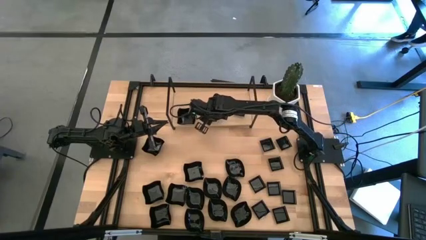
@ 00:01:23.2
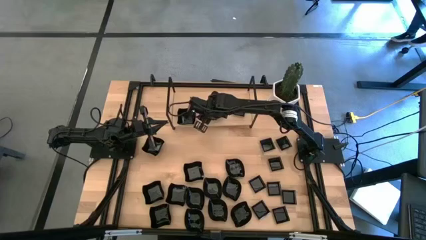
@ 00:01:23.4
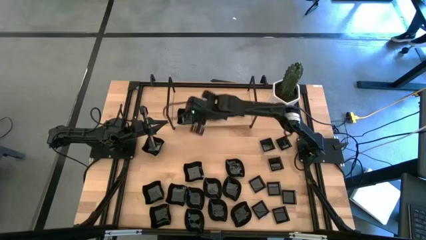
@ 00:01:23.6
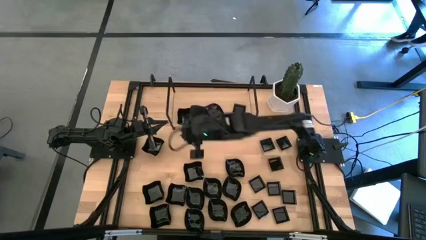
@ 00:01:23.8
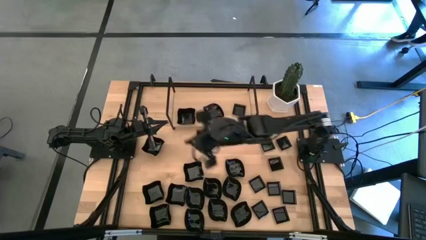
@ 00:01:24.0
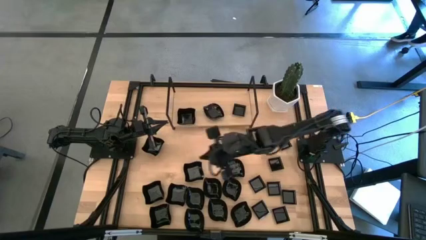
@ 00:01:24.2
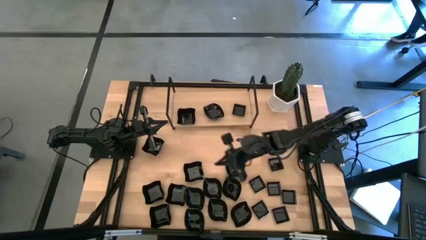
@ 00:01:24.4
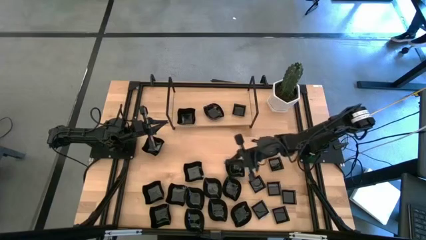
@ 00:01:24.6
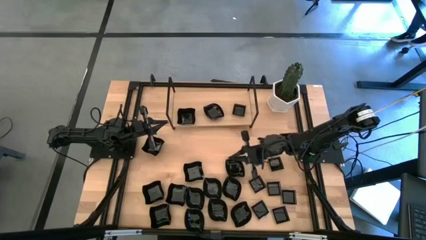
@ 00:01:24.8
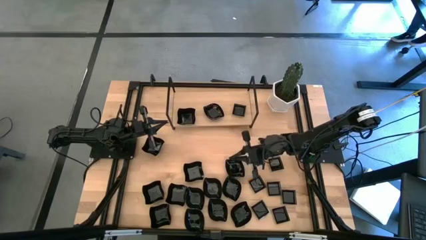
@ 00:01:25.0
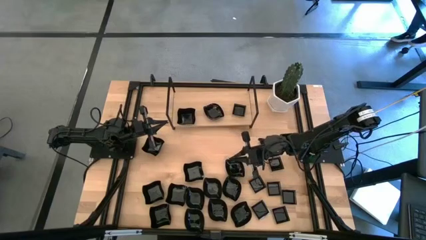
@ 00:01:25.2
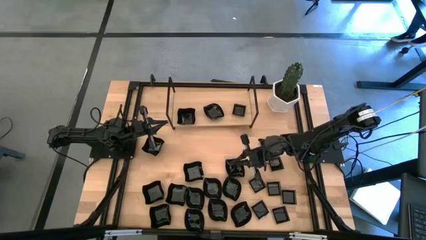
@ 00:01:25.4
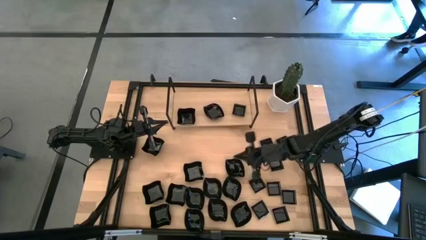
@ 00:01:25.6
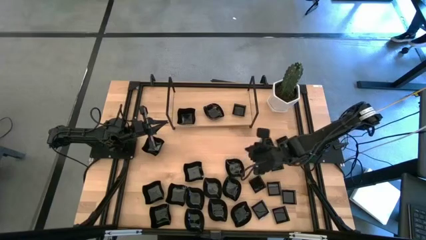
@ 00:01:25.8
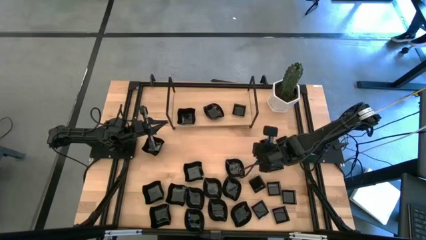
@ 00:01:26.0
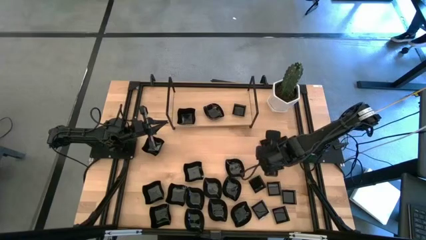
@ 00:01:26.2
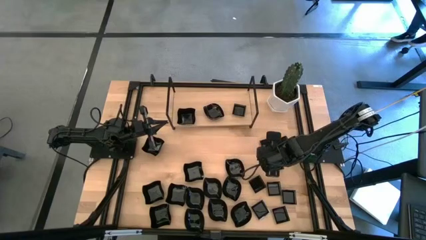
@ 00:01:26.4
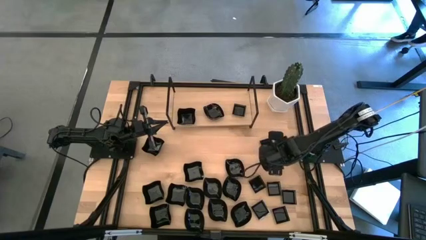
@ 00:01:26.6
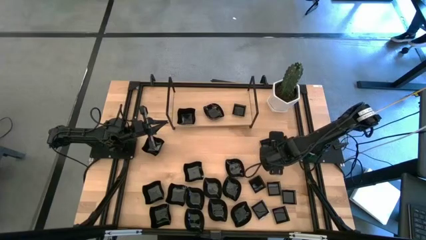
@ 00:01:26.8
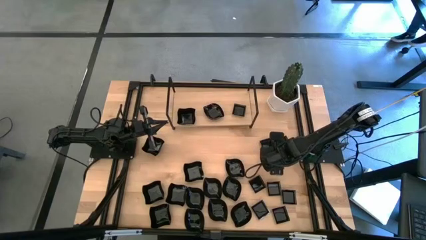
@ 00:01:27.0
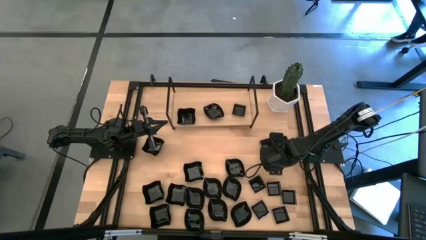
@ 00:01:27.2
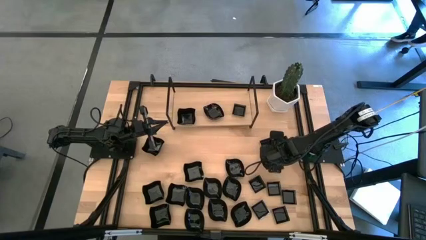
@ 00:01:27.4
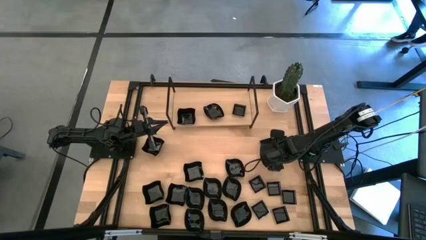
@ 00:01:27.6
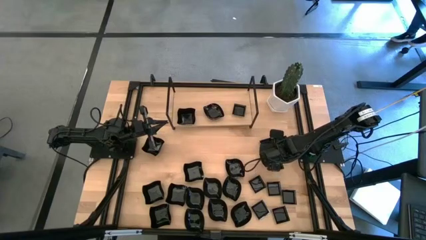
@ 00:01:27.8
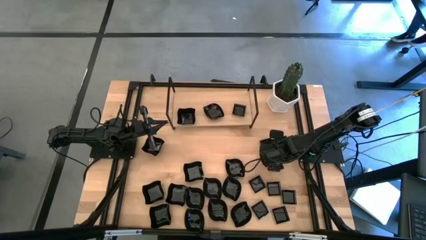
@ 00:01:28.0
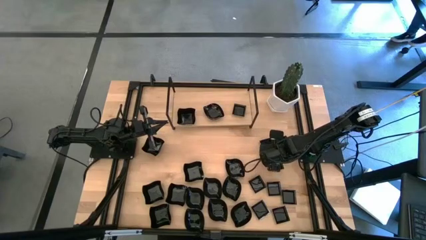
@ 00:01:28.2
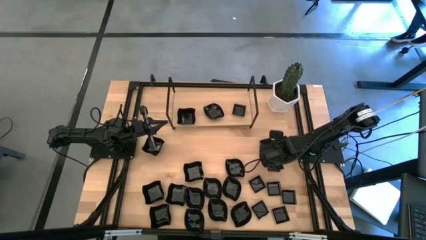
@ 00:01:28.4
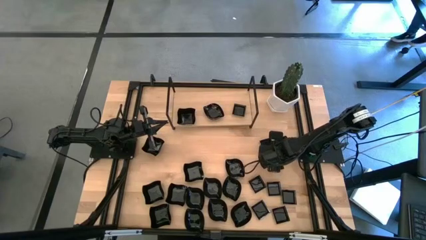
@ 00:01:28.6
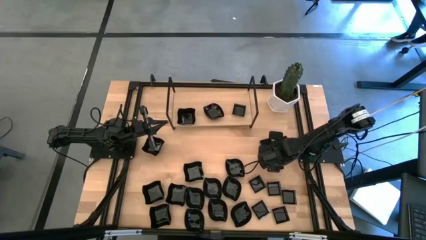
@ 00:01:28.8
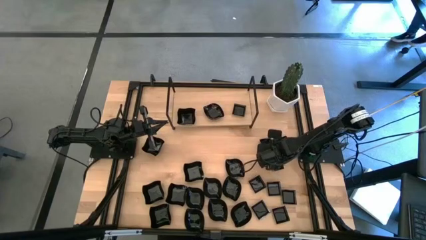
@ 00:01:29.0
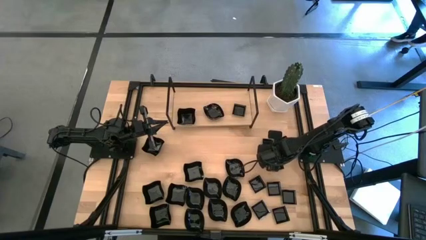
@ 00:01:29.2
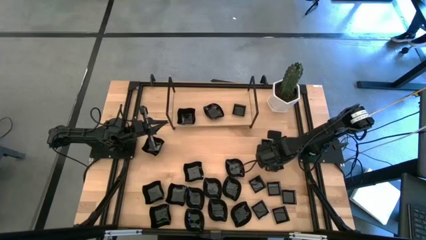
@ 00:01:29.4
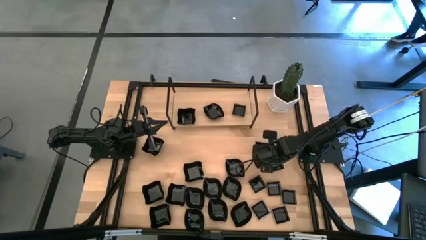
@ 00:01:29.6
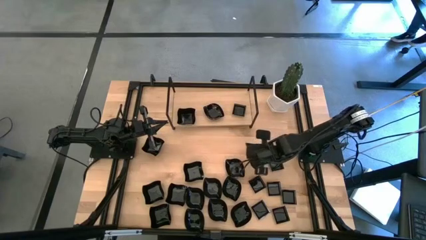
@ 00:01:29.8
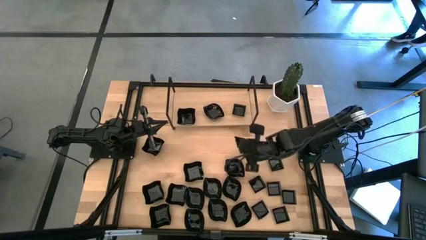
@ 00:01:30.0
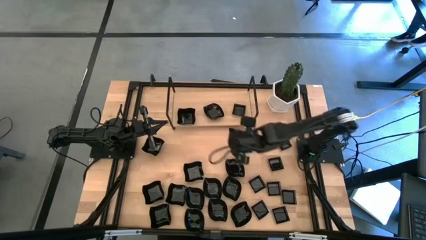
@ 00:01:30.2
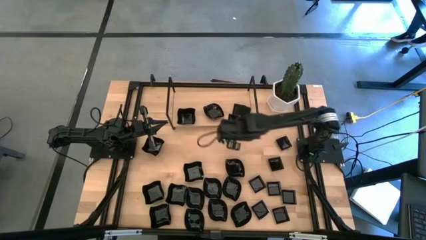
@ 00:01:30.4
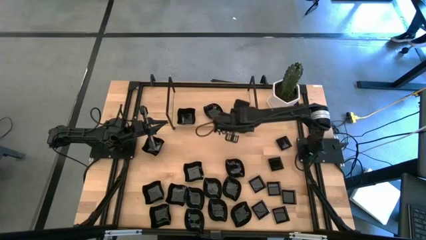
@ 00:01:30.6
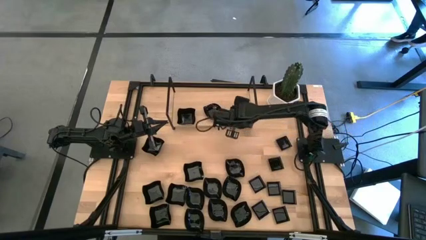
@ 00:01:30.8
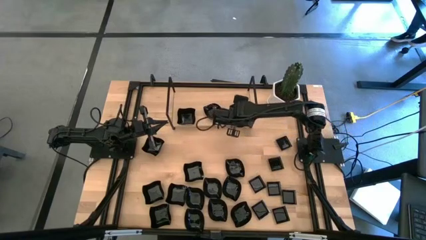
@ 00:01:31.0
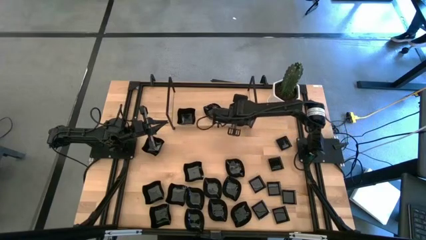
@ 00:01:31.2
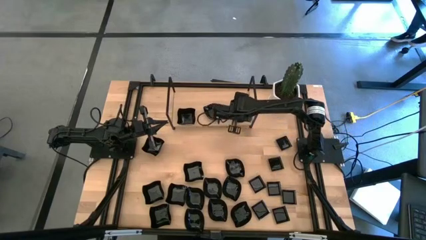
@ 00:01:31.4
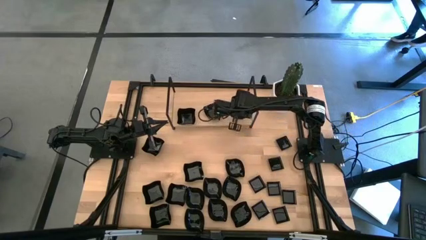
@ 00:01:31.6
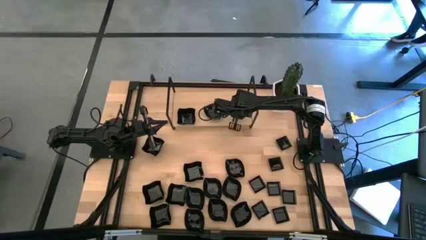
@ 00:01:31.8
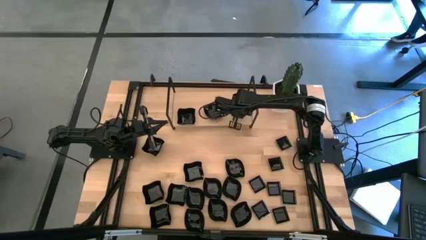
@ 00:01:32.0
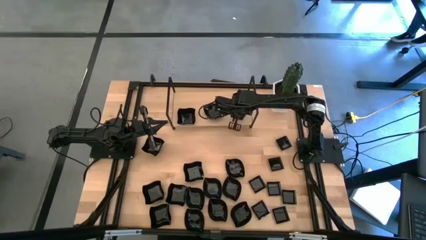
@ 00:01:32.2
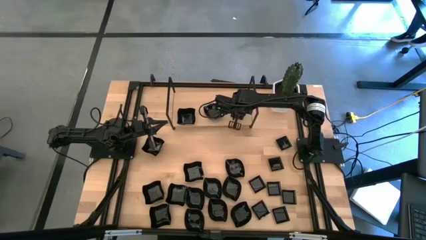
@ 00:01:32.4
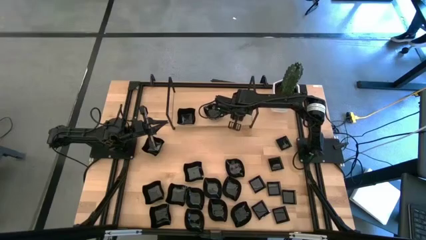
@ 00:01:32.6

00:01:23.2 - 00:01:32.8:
Task: Pick & Place Mini shaped plates
Stack the black square plate on top of the black square plate on the shelf

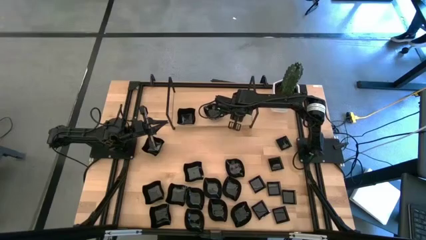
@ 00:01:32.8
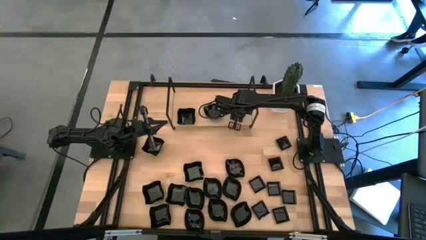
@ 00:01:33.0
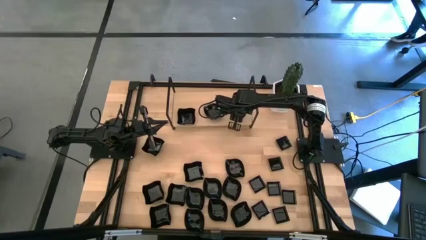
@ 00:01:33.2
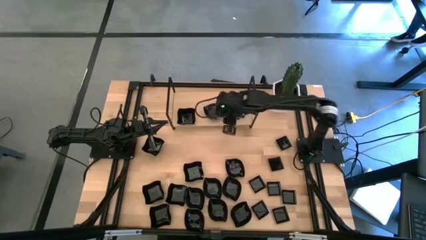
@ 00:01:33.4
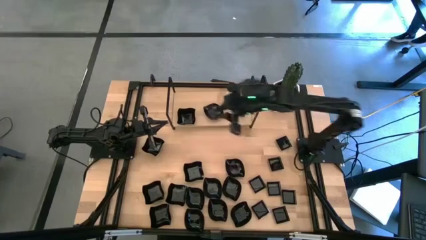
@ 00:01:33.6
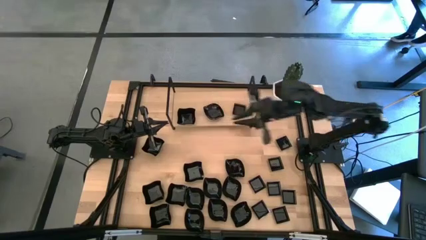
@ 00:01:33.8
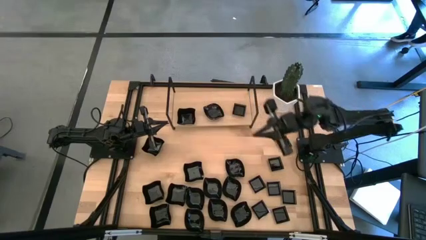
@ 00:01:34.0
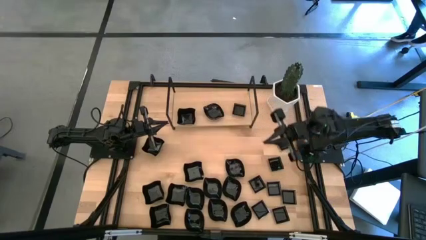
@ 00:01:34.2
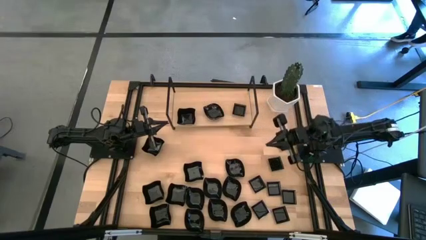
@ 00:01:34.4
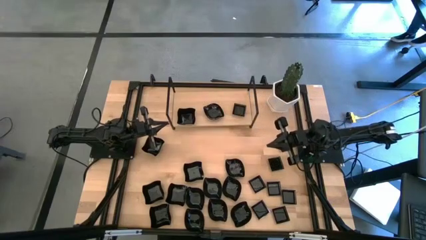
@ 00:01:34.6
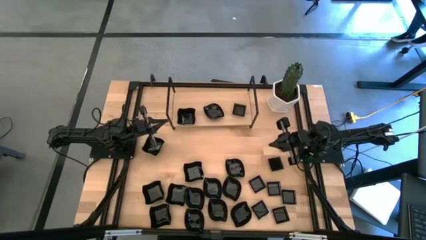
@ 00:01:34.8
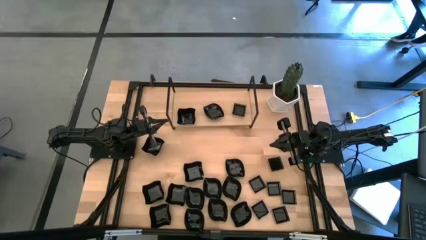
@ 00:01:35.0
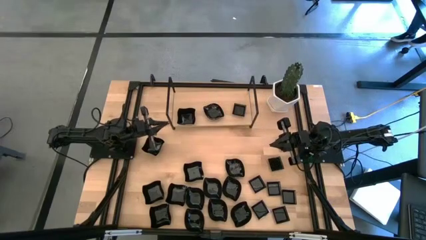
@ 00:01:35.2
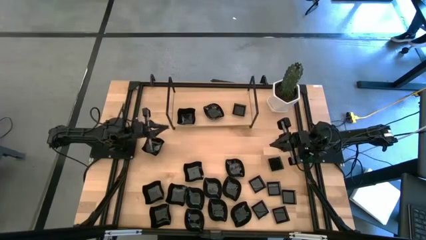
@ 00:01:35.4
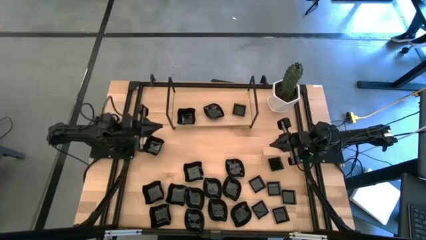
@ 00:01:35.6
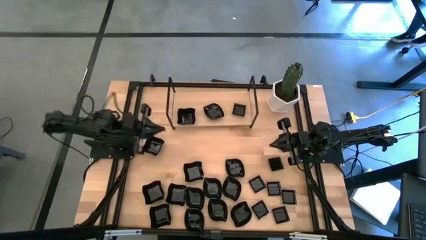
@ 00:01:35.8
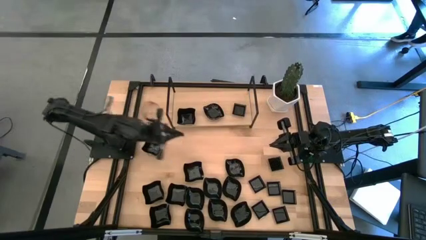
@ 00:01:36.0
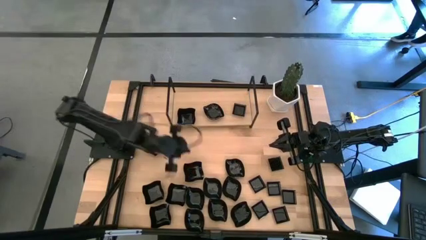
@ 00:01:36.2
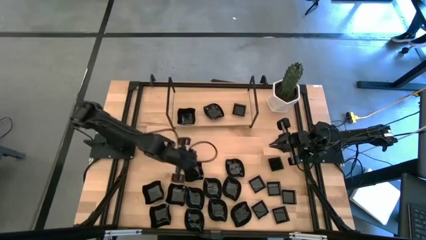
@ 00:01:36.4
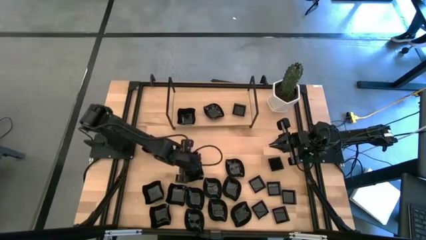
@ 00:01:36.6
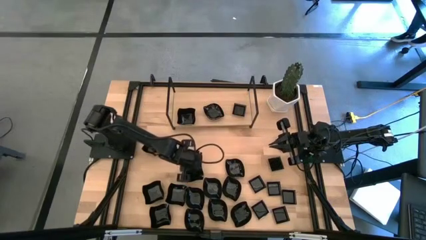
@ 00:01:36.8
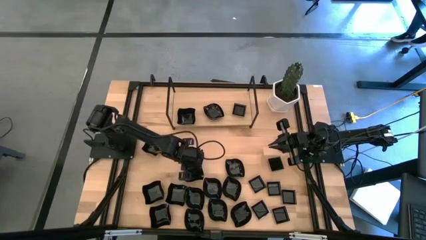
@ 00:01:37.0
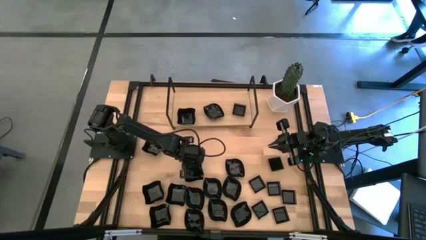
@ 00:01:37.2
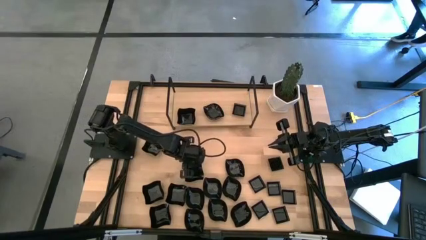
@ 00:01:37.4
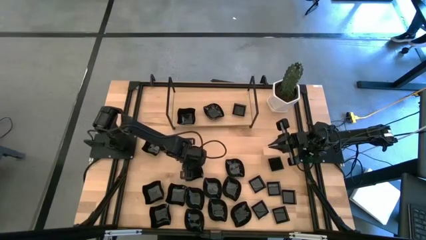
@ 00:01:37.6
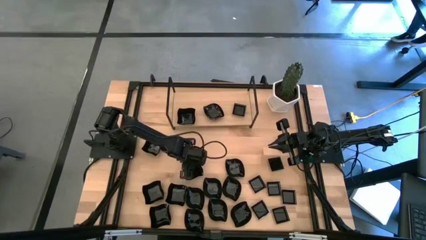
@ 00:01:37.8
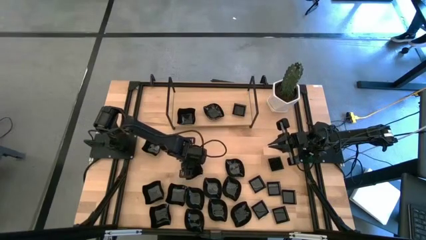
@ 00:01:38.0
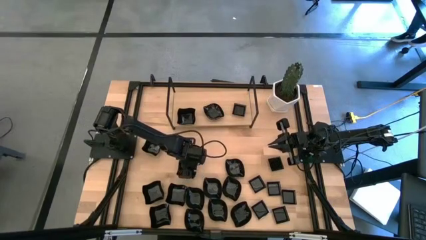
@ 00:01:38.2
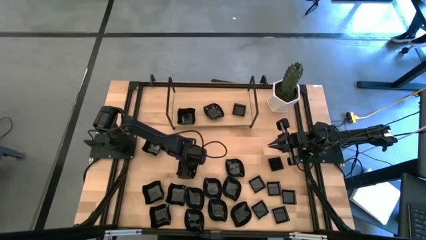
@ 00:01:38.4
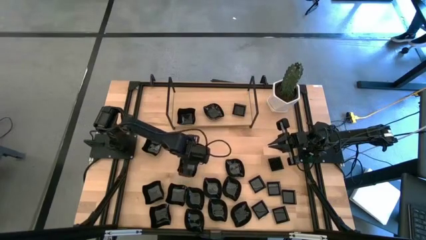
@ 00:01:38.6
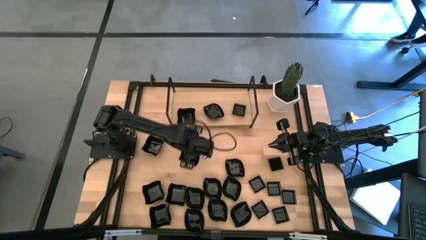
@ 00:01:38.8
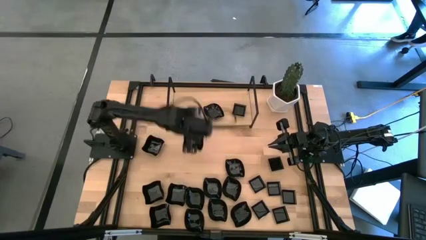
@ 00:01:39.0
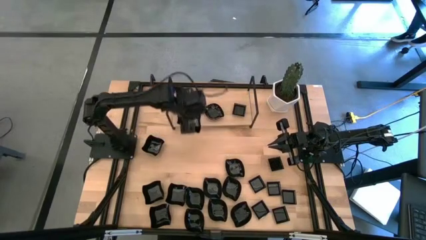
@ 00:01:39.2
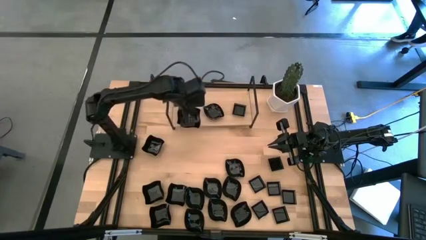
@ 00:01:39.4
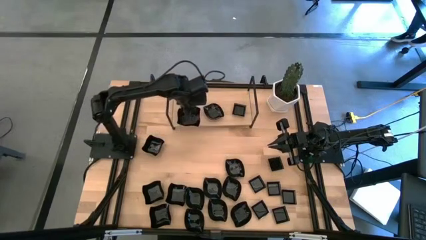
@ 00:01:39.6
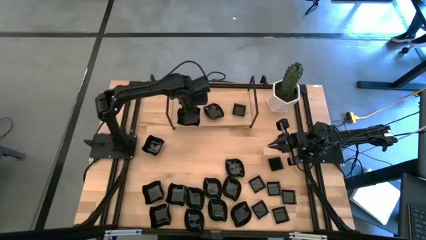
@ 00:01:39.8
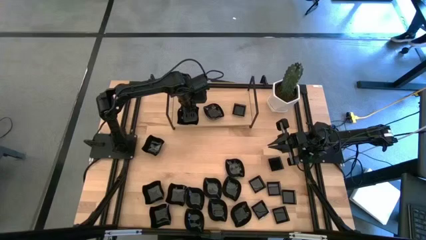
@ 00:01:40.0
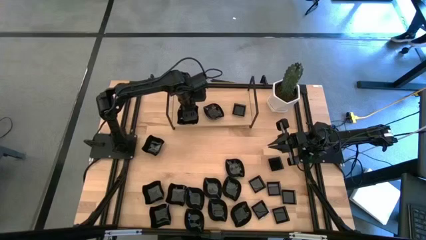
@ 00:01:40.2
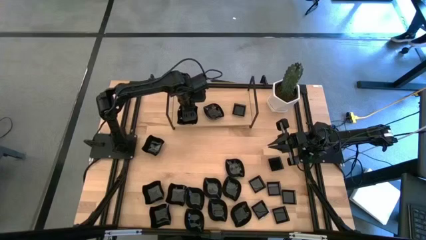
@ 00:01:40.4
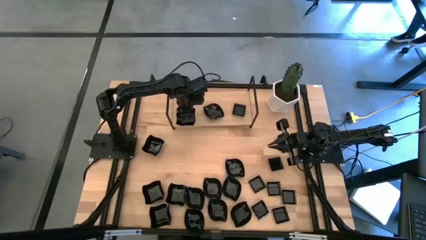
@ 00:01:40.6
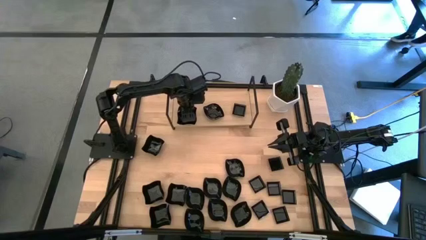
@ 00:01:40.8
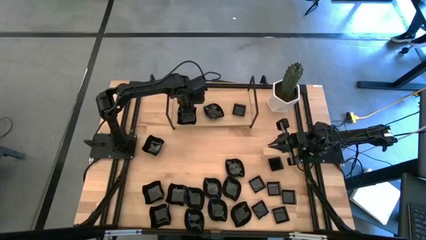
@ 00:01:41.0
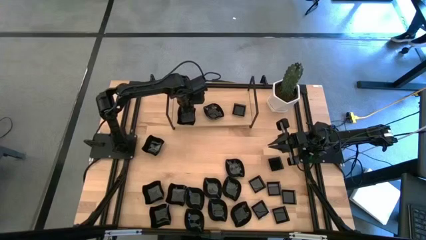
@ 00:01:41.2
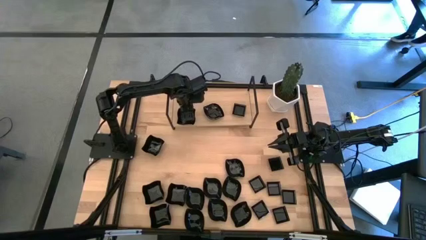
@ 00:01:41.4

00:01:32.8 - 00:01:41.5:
Stack the black distorted square plate on top of the black distorted square plate on the shelf
